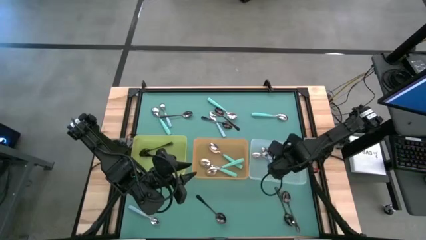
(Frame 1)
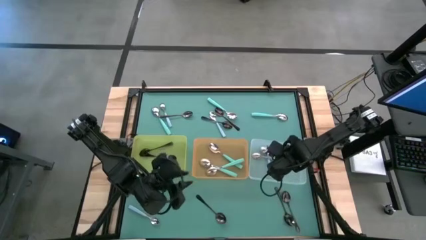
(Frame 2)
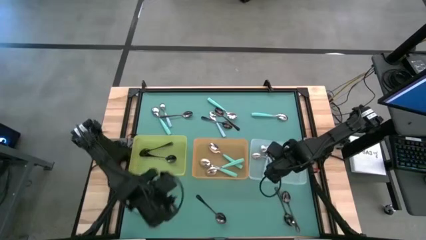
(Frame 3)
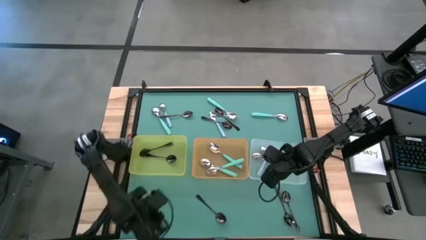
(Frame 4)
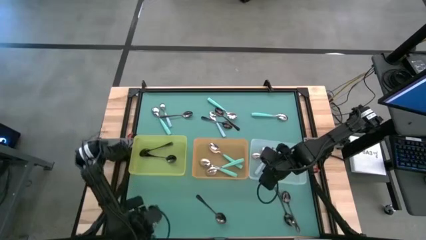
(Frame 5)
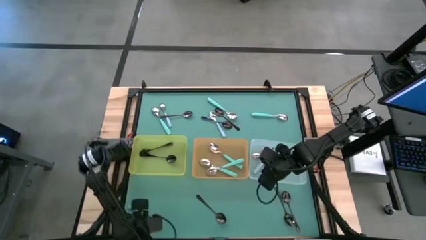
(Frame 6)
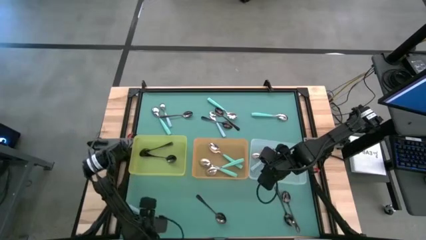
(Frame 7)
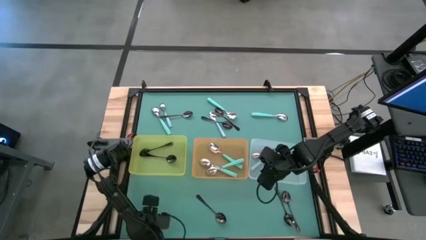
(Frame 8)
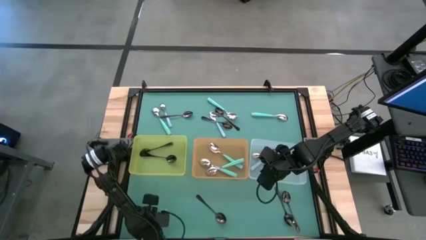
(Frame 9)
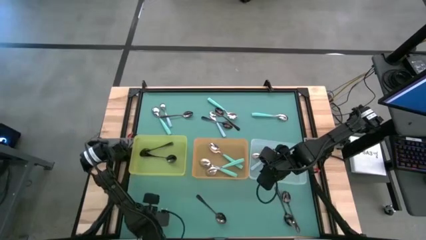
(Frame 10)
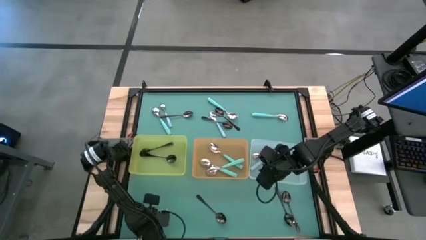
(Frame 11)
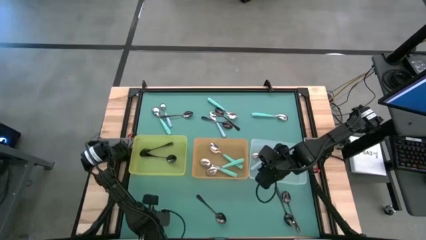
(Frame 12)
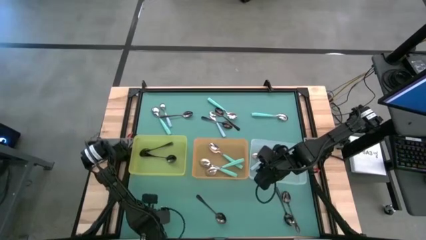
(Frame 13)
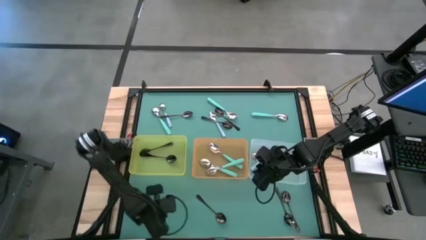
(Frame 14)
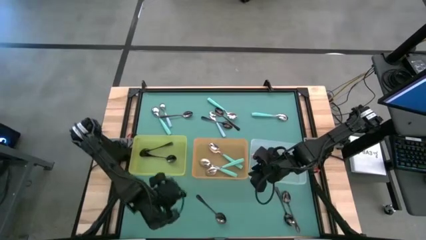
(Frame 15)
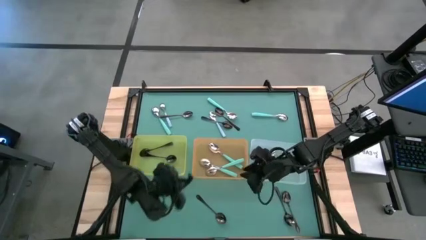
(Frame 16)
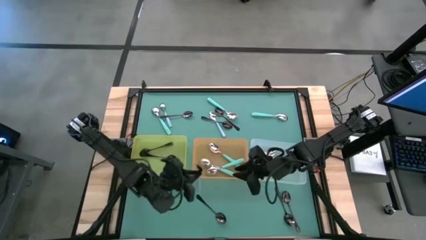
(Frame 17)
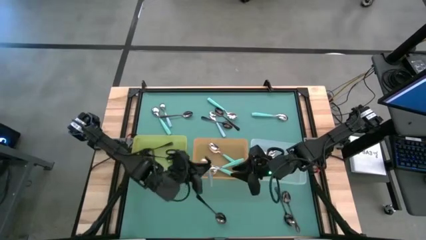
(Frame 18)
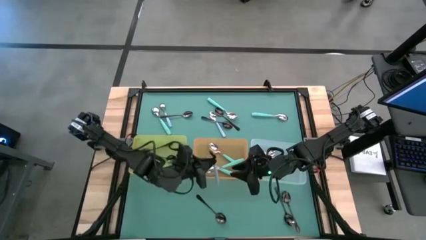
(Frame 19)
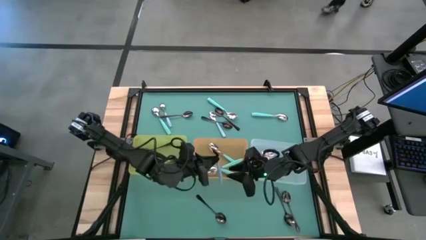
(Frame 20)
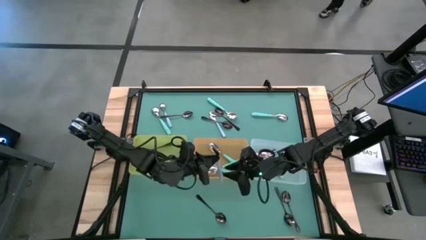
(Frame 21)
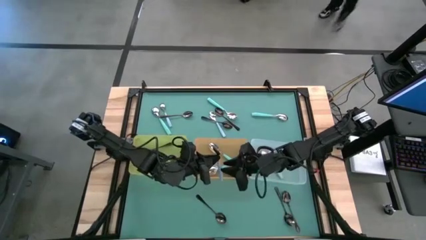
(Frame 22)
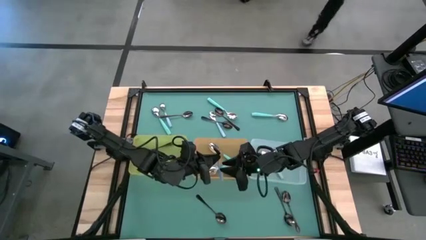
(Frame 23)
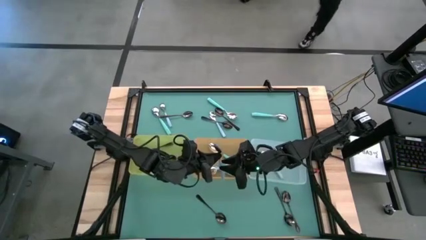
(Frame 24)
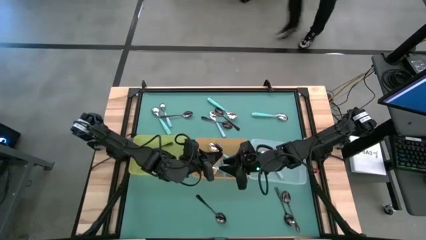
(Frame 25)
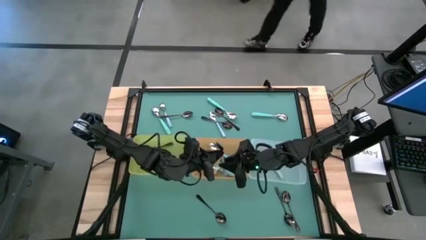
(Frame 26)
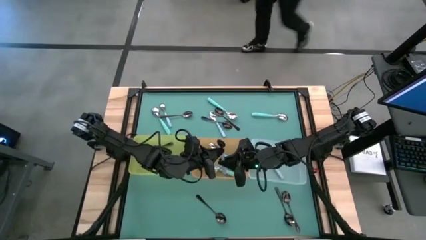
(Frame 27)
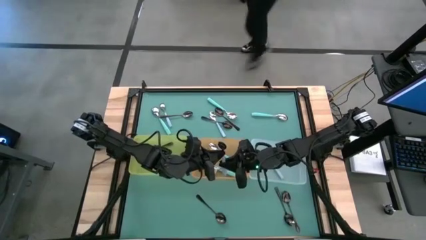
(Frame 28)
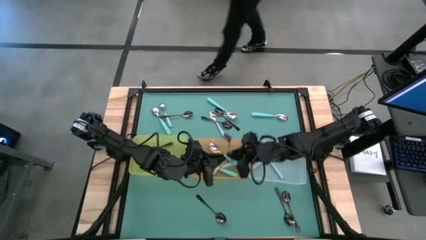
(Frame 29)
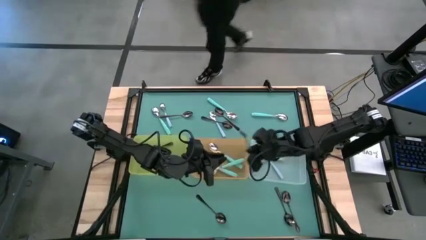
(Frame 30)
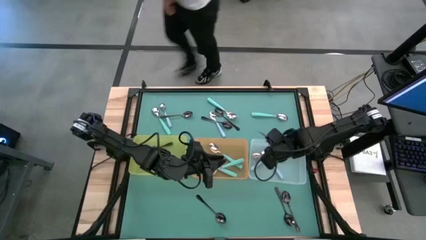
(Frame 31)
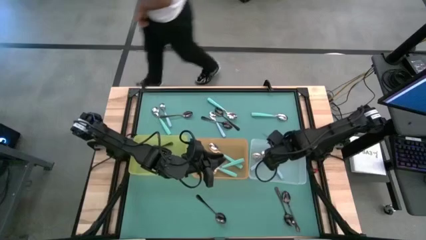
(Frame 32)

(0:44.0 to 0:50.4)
Task: Sort silverware by color (type)
Put the blue spoon into the white bin

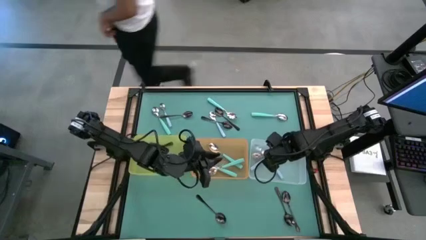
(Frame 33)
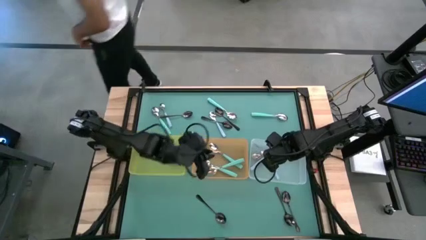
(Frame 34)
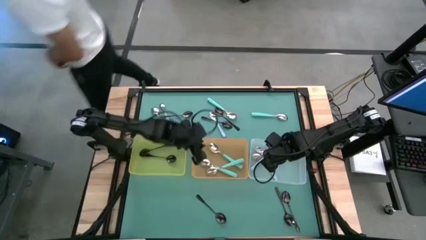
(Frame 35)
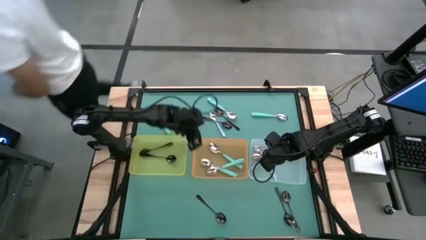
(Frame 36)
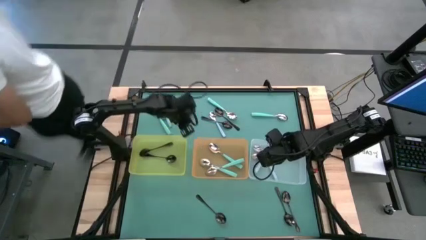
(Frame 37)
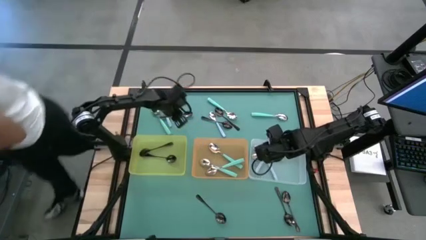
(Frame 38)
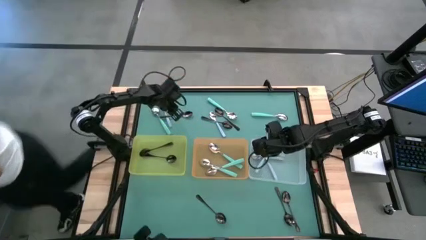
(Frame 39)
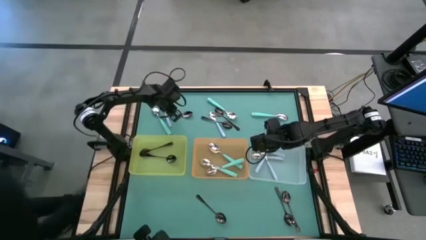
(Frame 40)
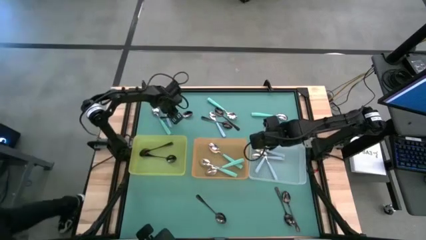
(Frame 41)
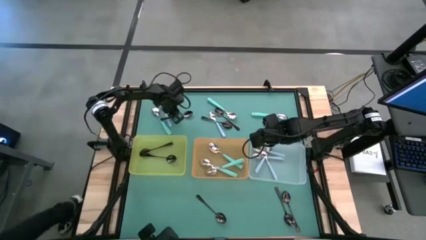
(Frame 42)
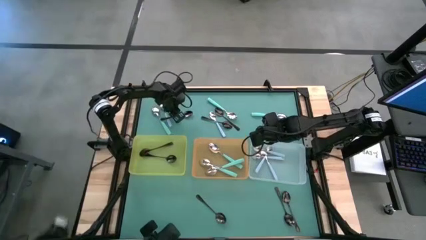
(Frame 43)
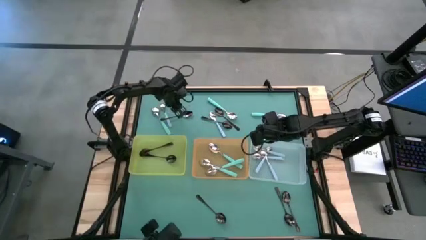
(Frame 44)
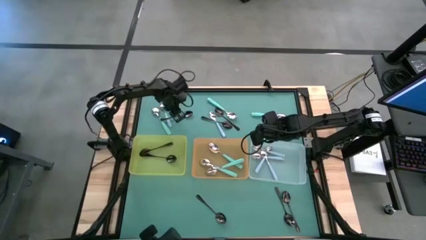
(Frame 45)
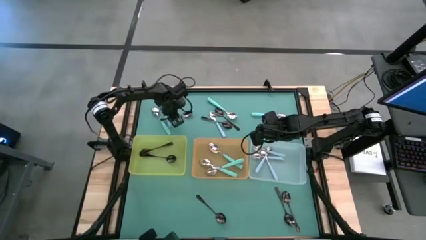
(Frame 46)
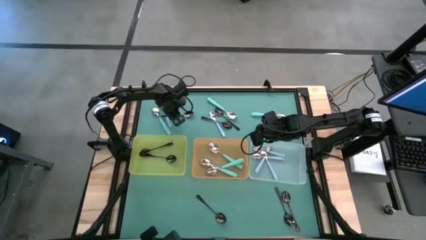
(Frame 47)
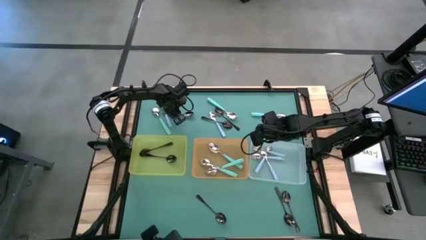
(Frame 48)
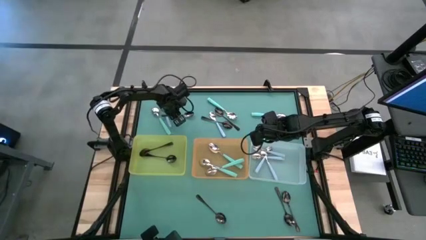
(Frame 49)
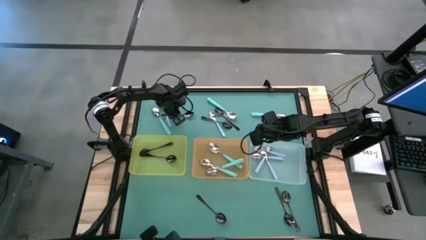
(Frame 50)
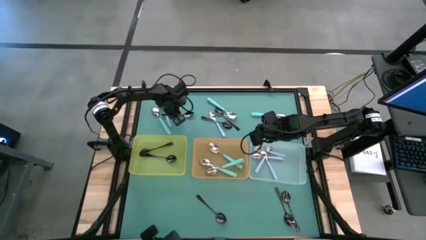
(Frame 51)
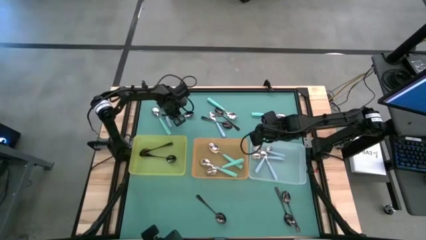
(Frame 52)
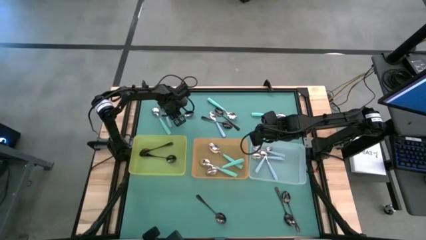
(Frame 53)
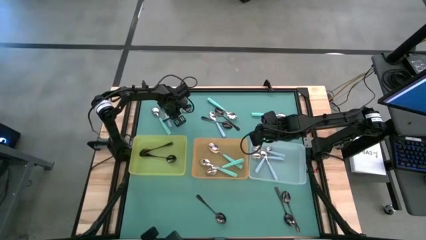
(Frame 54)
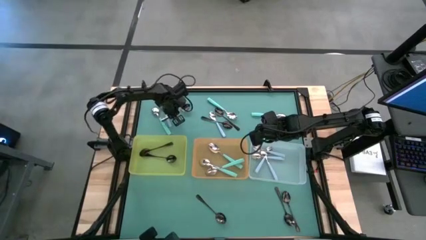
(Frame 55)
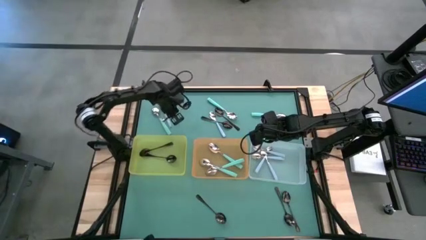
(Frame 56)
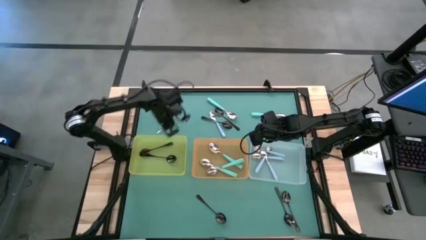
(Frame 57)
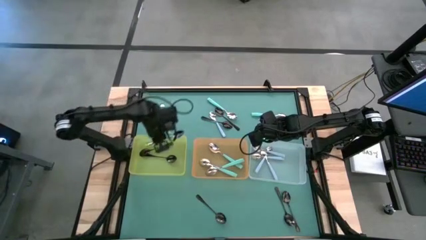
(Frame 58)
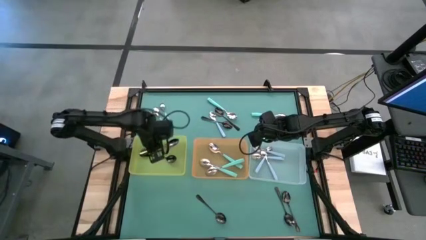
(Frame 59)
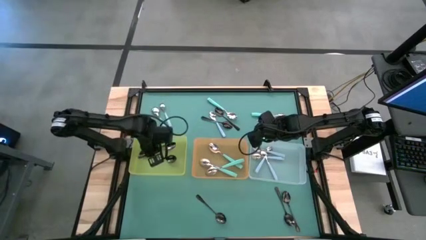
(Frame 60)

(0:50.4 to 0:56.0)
Put the black spoon into the yellow bin

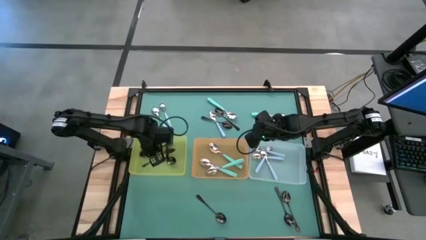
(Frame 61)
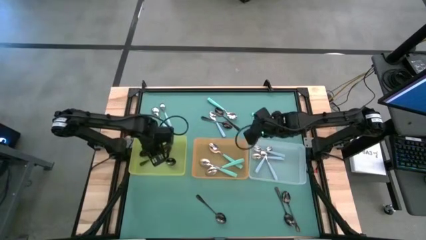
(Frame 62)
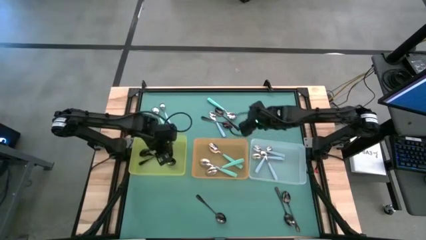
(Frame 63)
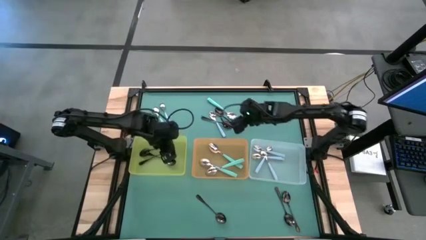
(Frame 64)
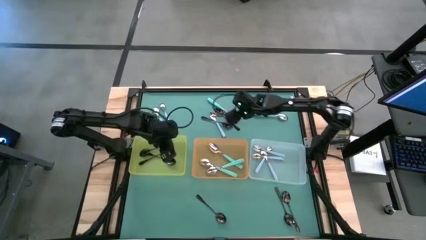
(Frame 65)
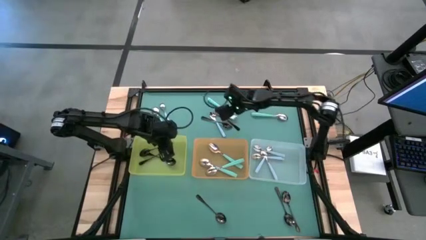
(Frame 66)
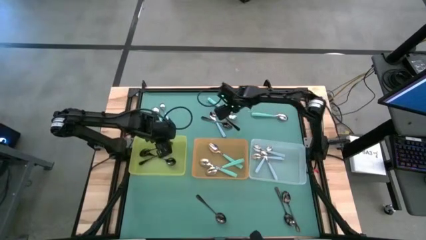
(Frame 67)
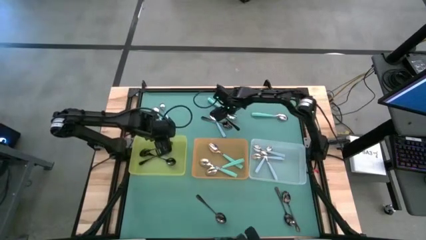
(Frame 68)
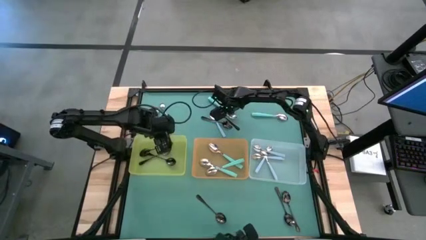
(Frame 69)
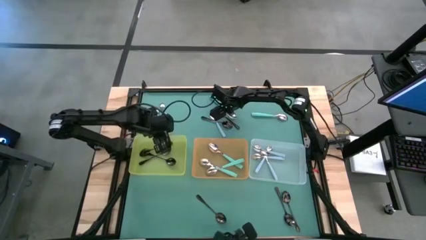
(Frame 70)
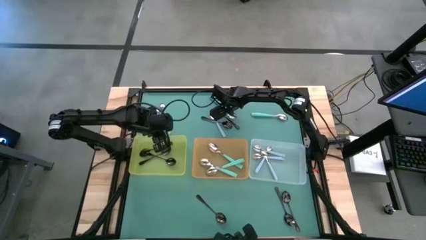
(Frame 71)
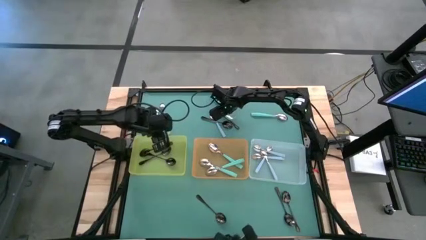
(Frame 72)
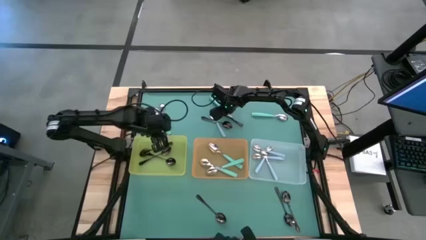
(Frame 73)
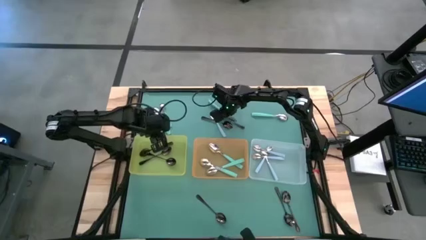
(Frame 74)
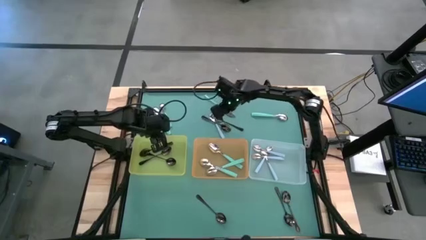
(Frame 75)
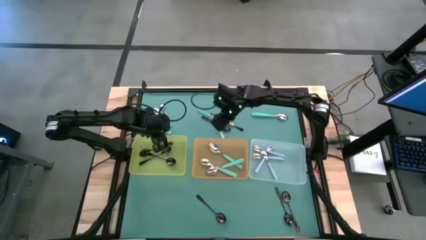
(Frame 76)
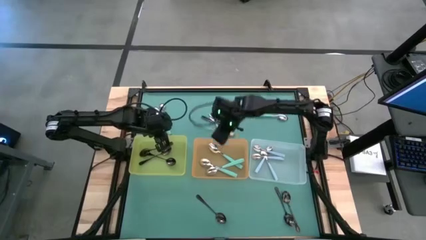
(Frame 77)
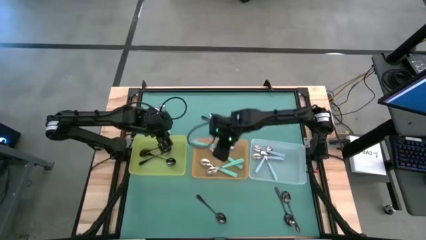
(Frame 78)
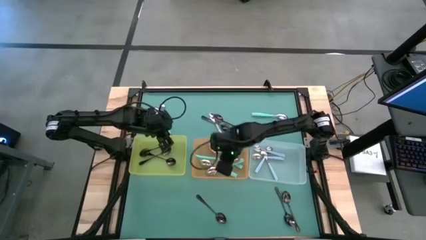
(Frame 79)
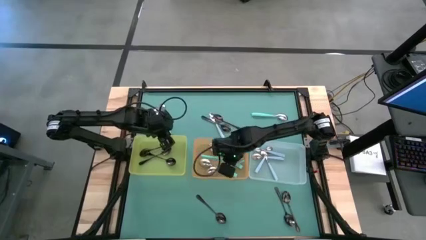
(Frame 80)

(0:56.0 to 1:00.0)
Put the green spoon into the orange bin
